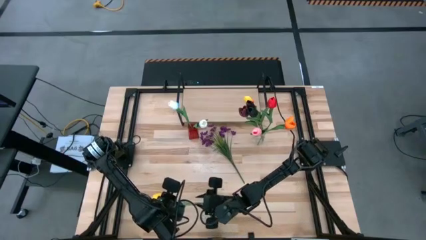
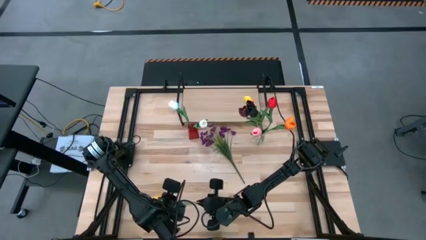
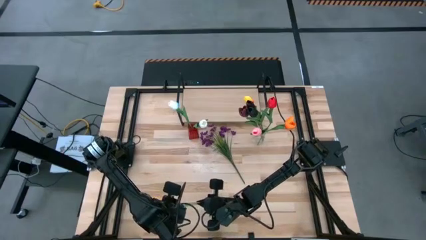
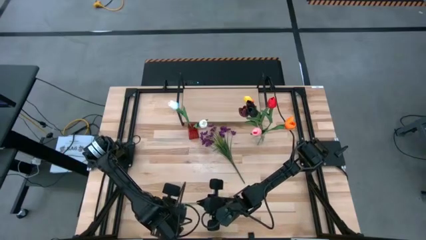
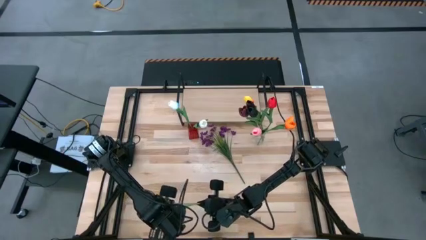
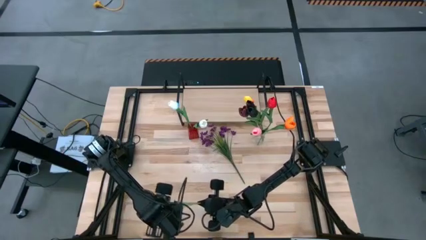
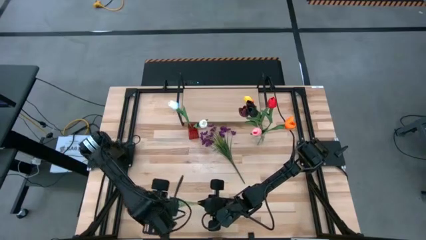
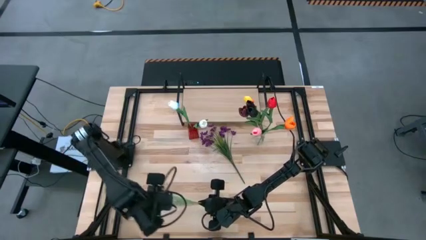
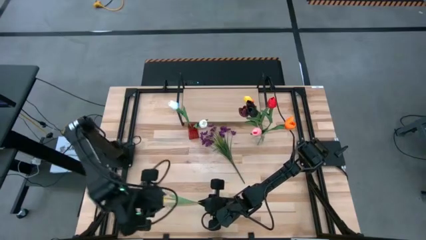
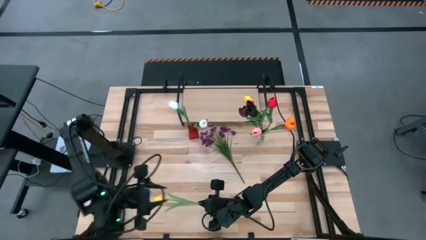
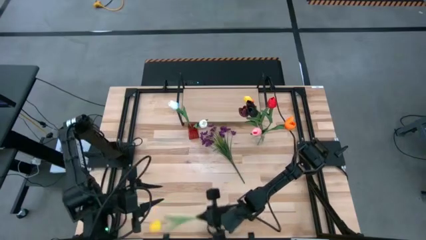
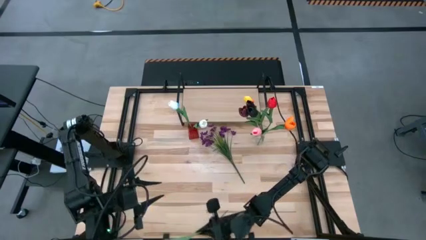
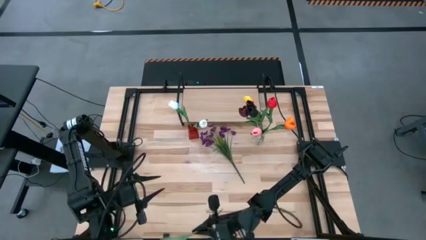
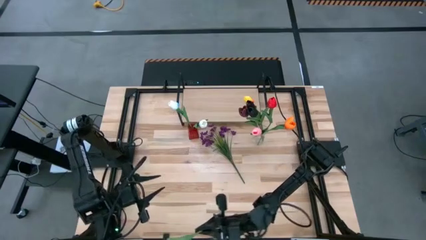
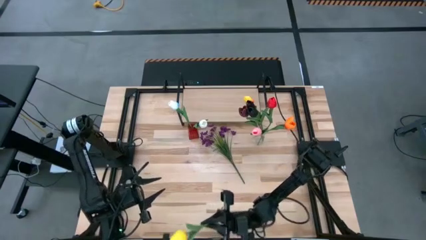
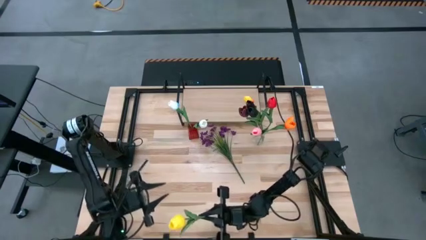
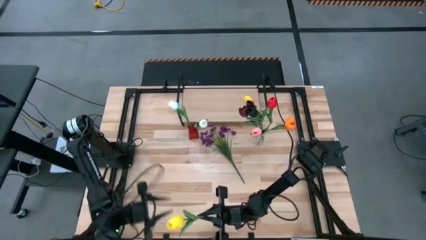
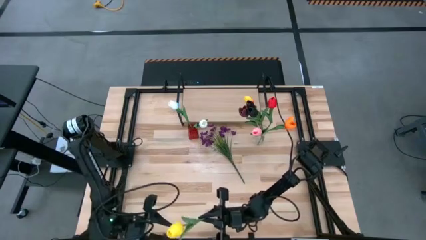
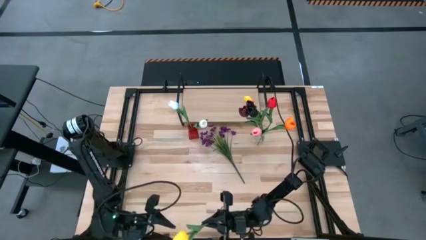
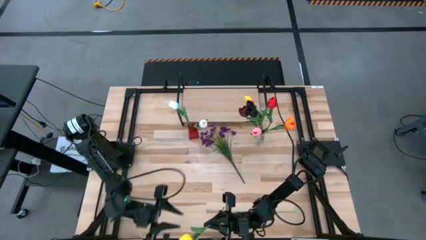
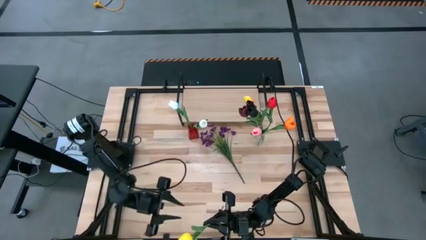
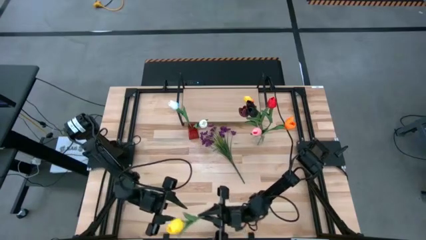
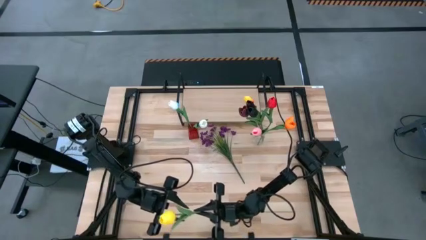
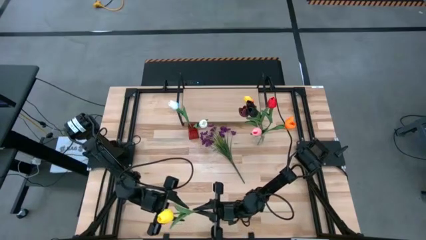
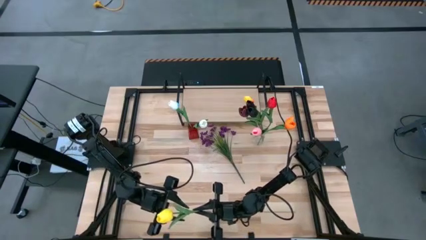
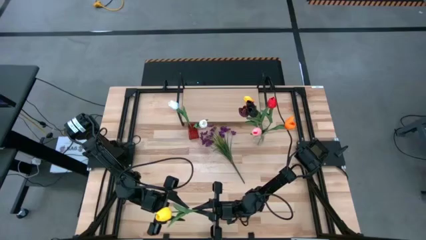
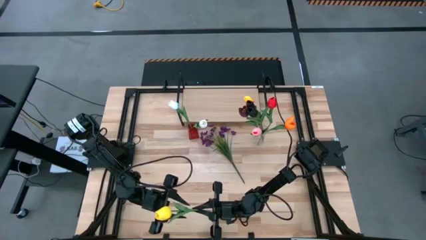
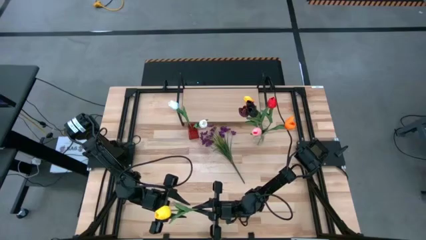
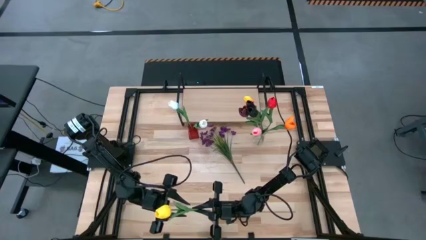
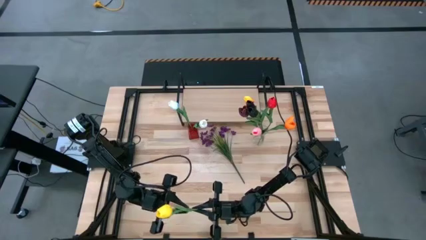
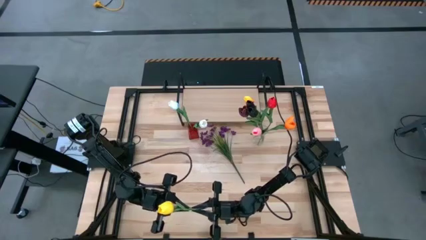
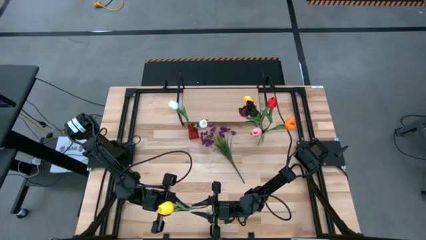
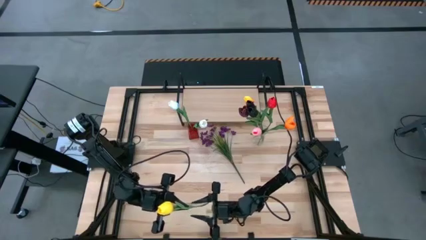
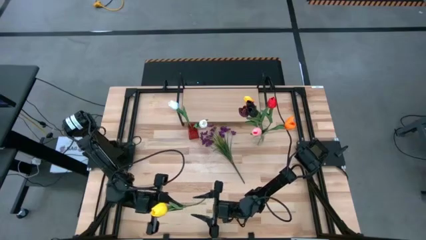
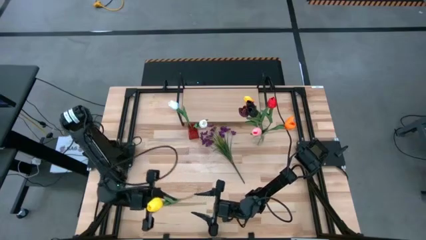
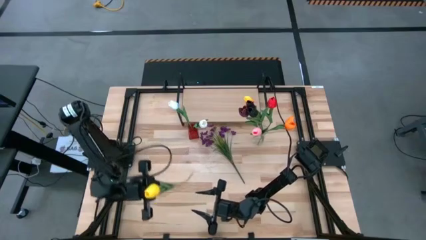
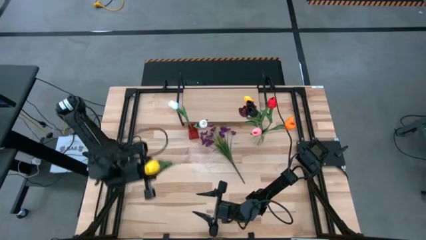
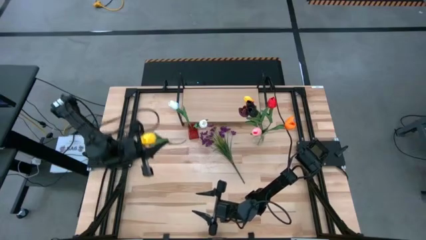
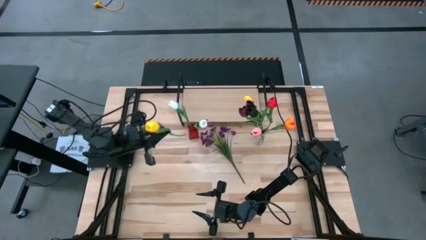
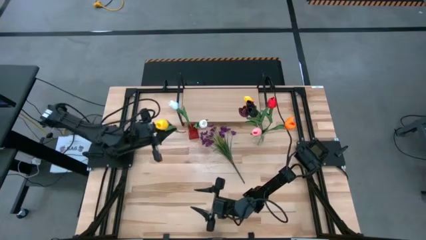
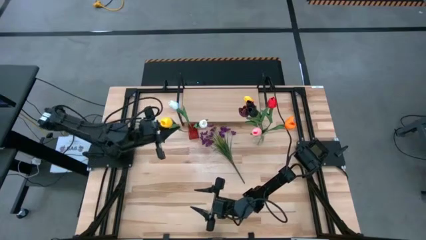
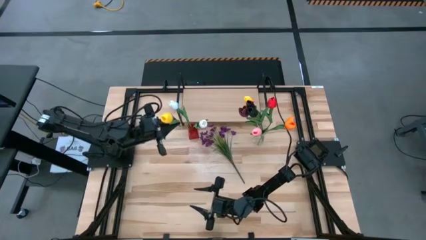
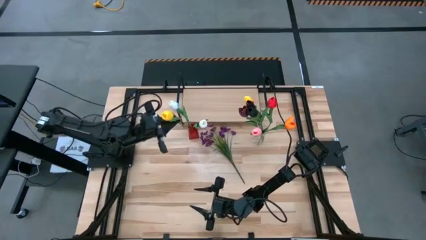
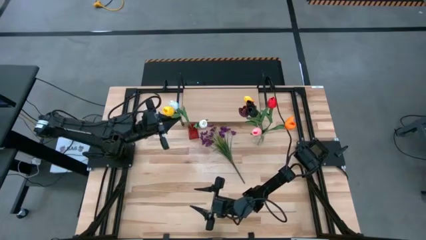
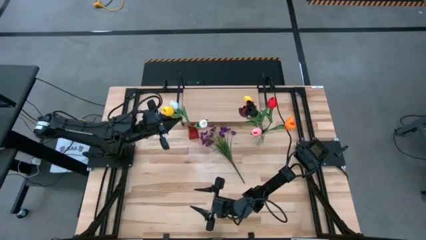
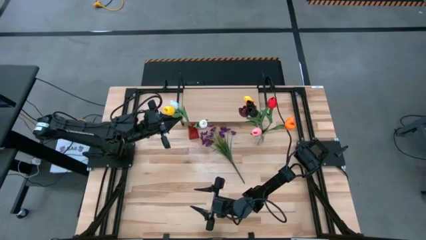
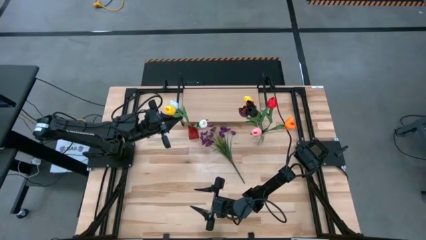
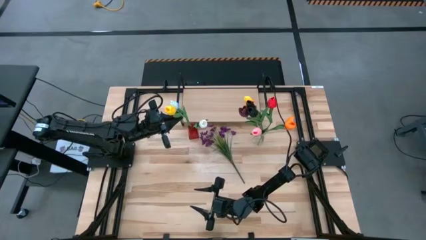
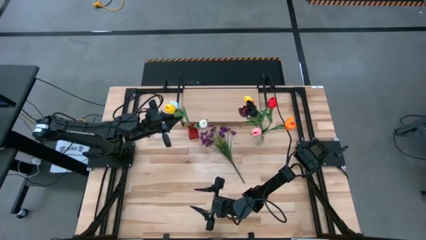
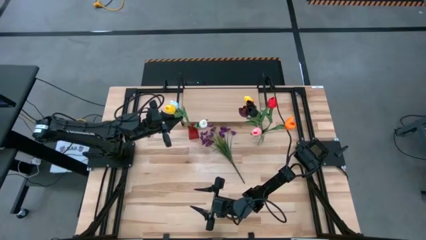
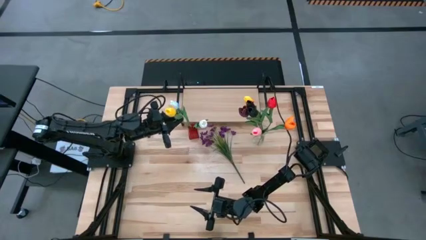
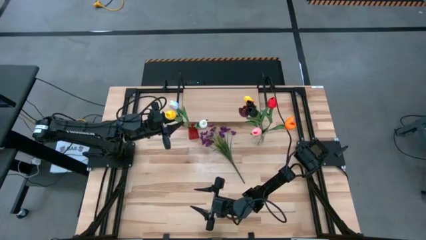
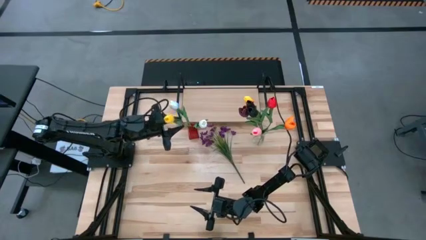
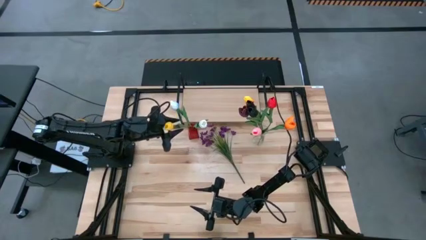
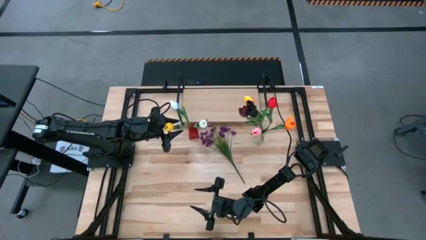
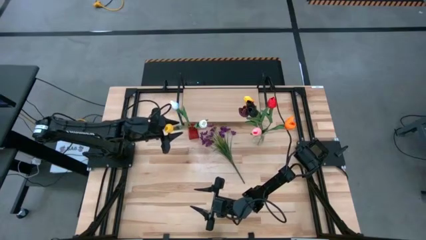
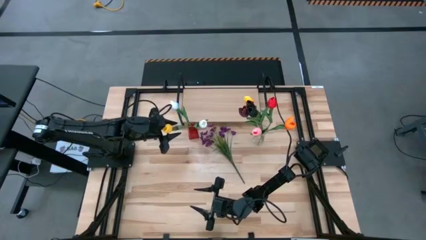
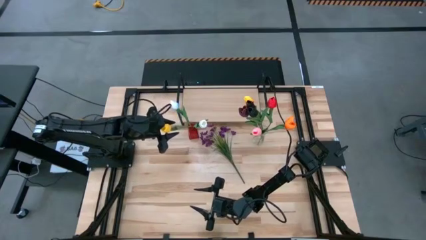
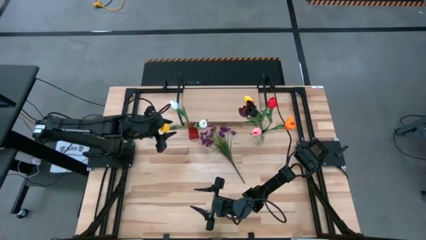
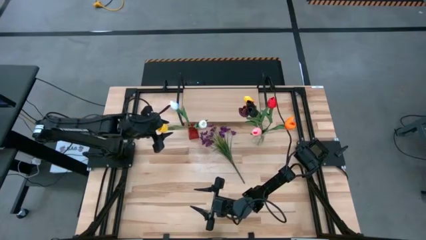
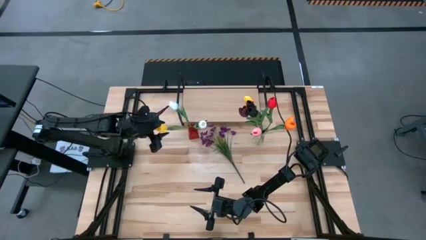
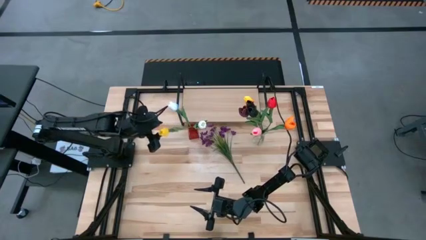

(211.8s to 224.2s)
Task: Pick and place flowers into a vace then onto a shelf
Put the yellow flower into the red vase
